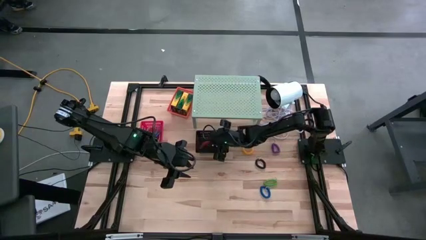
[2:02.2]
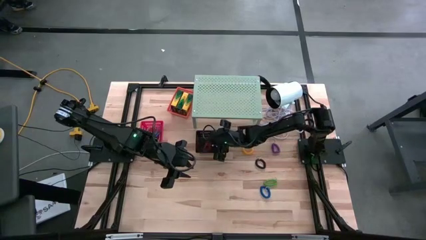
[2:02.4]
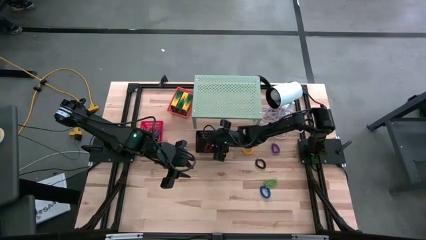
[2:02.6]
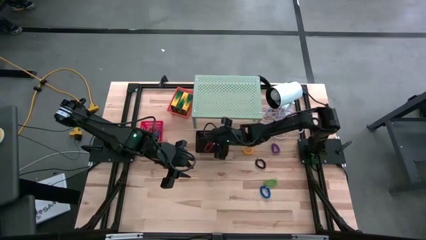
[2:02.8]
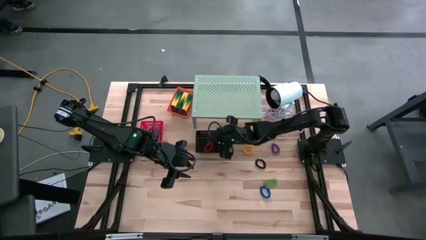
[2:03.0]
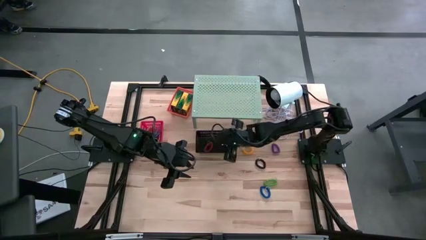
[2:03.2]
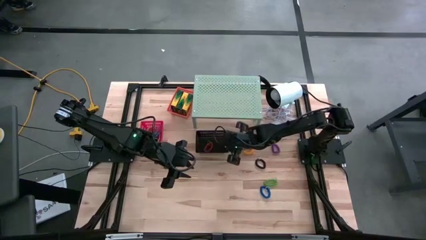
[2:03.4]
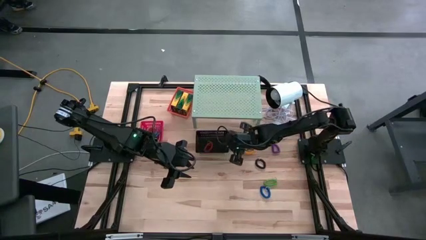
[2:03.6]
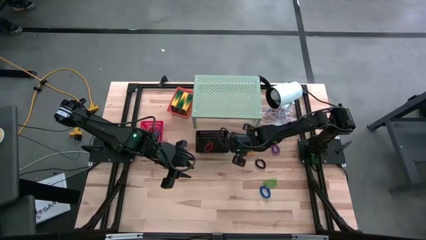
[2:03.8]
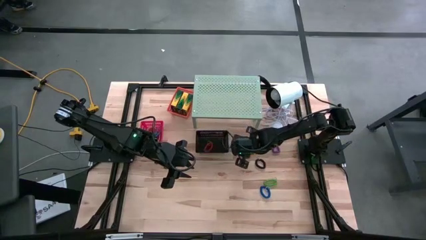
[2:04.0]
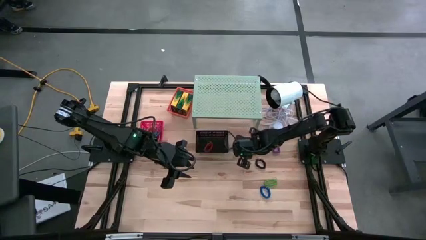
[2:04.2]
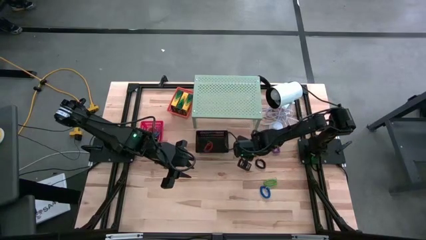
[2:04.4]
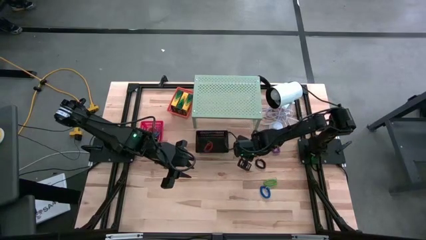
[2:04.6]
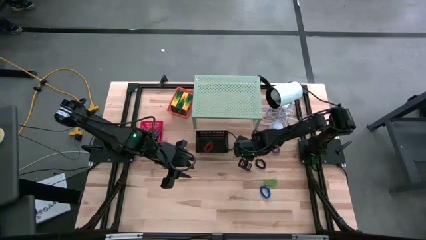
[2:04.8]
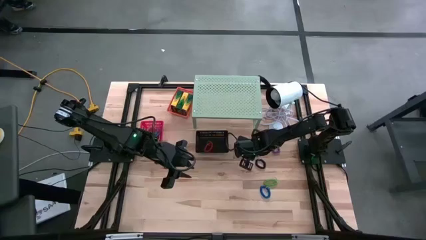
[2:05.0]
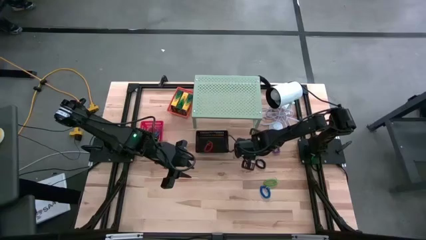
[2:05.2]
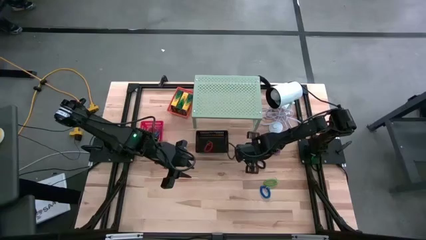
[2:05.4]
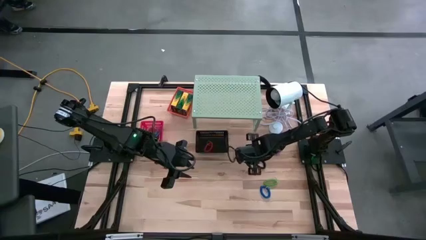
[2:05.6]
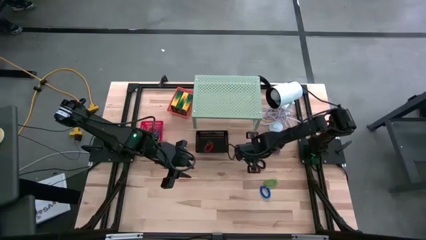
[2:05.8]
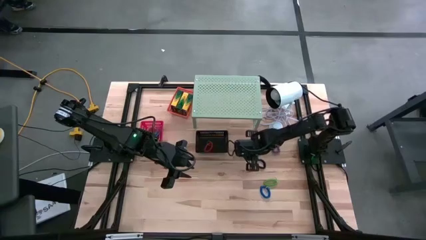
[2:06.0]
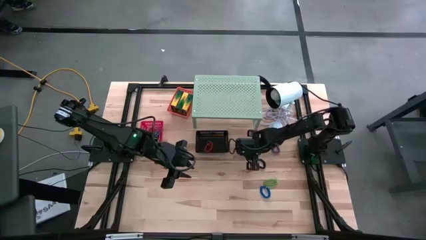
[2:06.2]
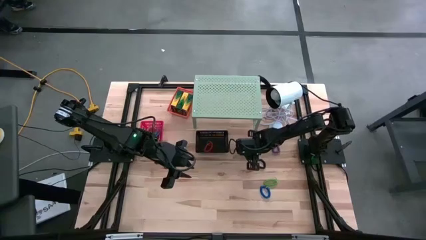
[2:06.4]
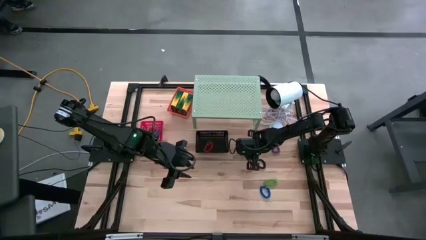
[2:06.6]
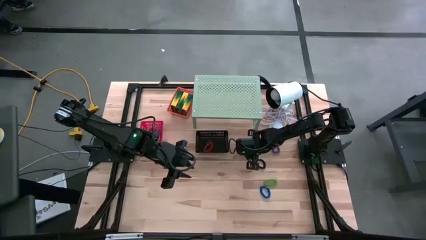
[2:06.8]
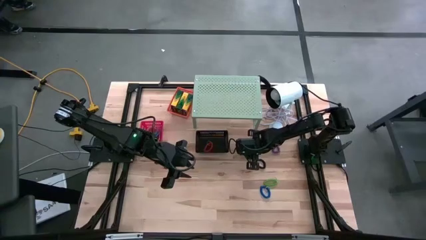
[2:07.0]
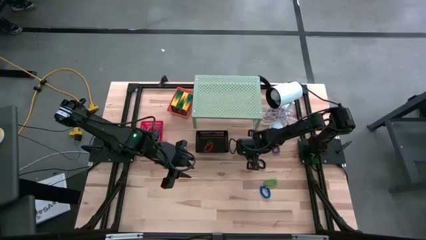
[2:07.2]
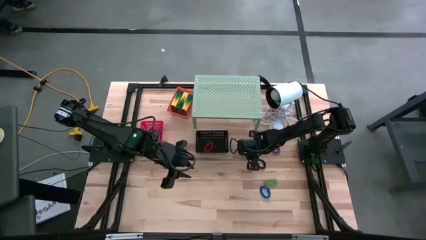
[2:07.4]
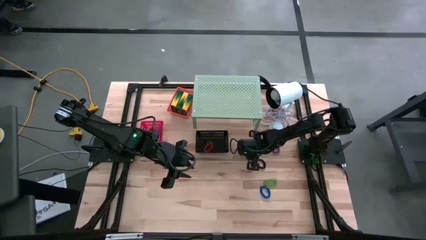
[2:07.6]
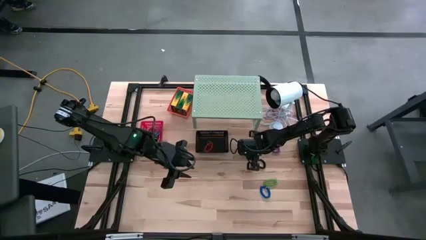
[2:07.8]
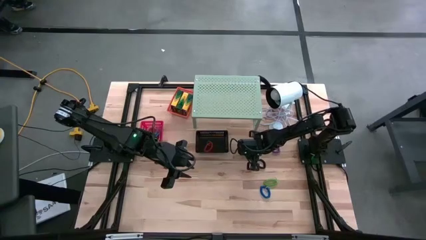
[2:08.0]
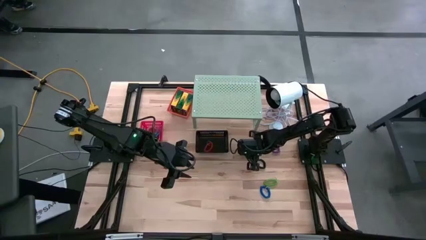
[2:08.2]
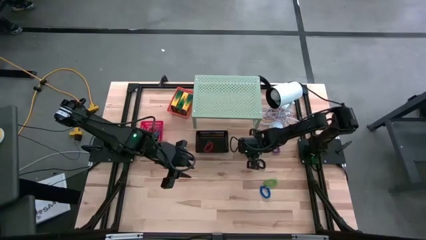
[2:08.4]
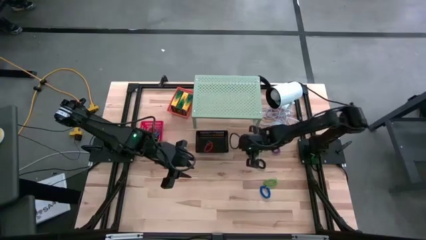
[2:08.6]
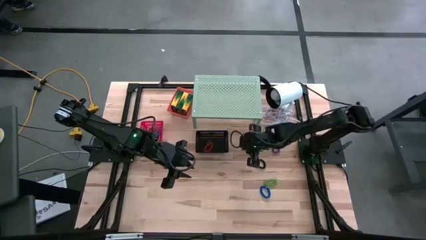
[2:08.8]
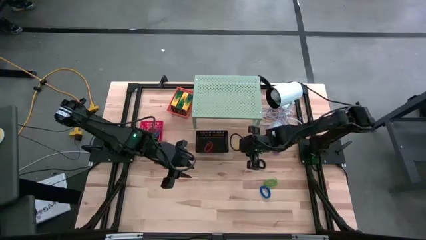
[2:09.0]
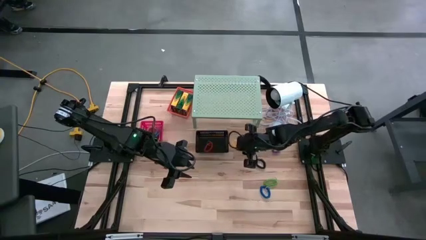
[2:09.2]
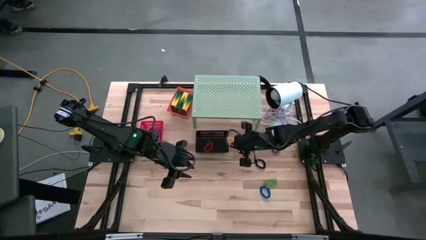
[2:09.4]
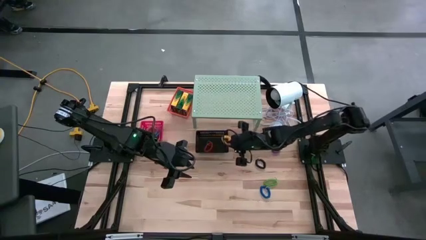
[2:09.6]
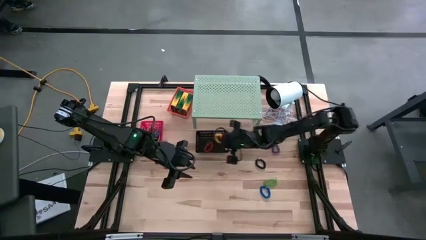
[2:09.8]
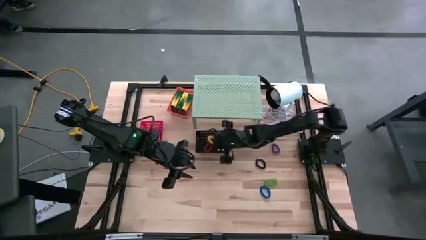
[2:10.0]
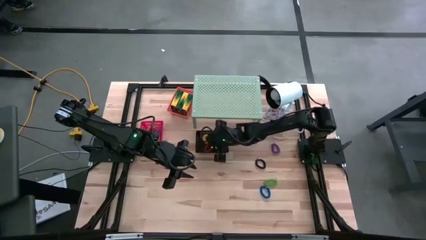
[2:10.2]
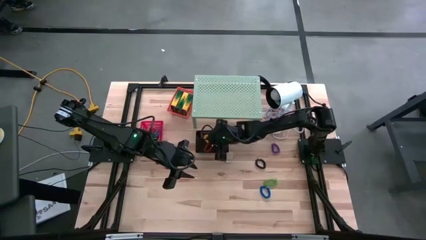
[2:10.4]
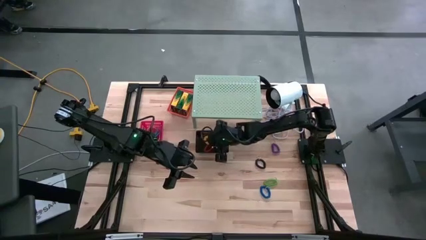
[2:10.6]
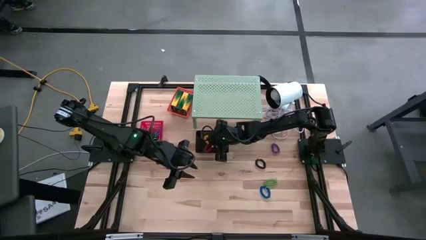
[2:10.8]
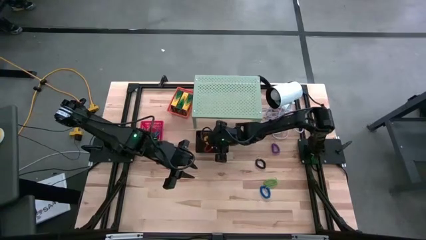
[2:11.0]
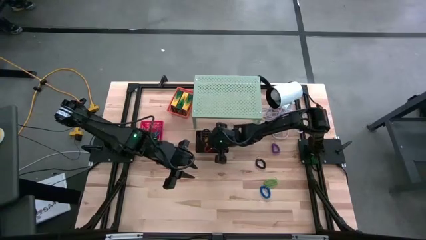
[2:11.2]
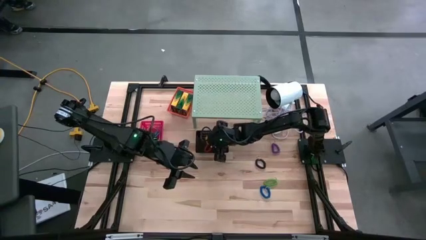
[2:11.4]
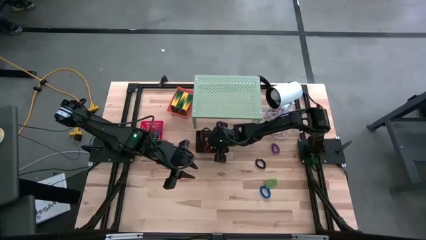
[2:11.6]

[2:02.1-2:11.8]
Task: Pick & Place Office Desk Supplies
Put the yellow spring rubber band into the black bin on the shelf

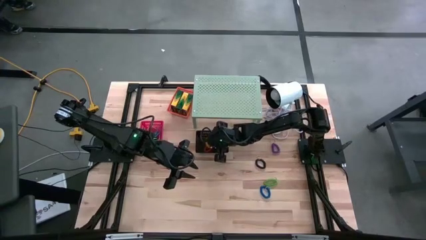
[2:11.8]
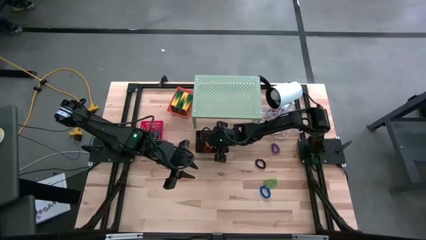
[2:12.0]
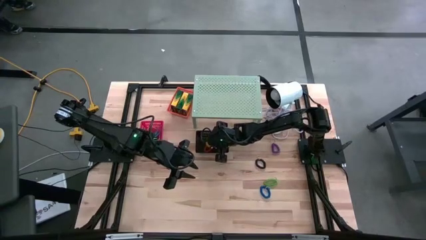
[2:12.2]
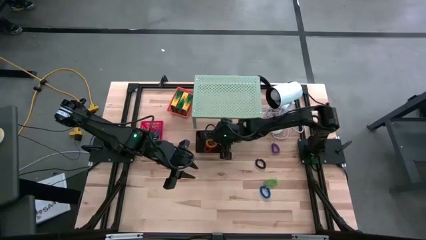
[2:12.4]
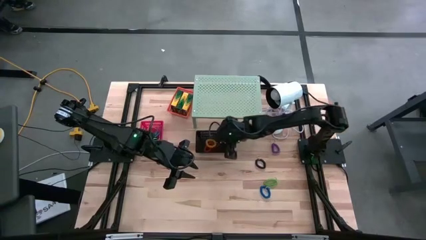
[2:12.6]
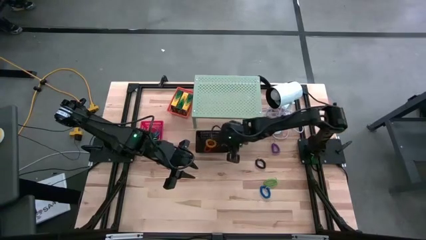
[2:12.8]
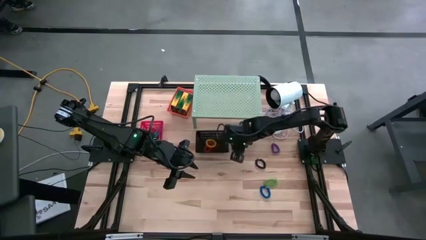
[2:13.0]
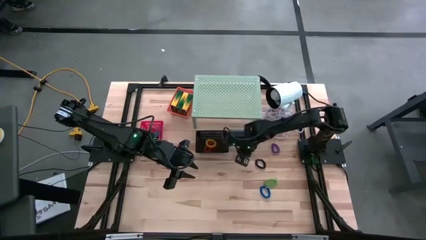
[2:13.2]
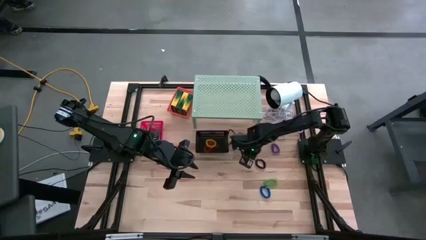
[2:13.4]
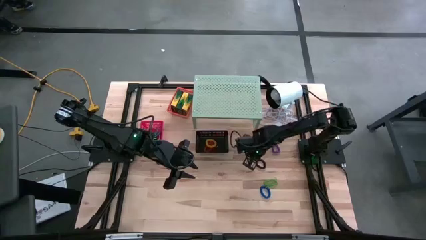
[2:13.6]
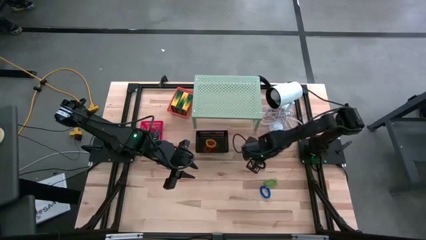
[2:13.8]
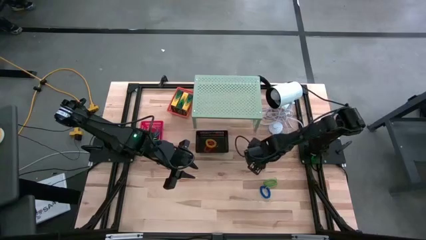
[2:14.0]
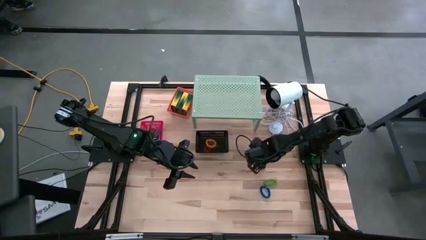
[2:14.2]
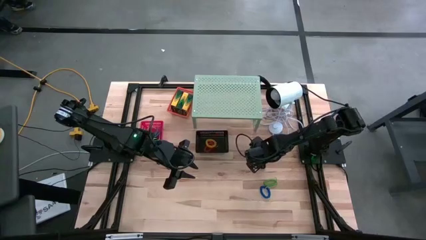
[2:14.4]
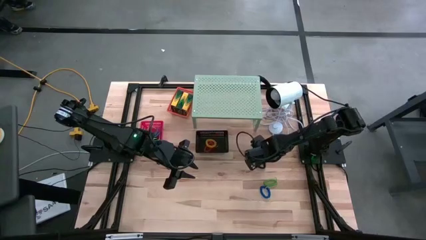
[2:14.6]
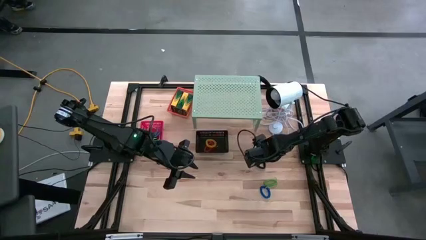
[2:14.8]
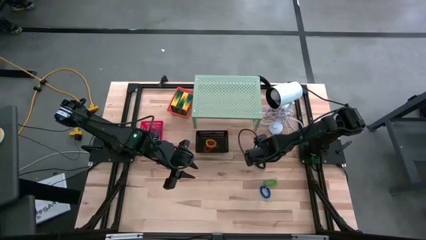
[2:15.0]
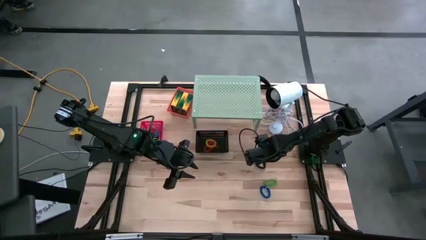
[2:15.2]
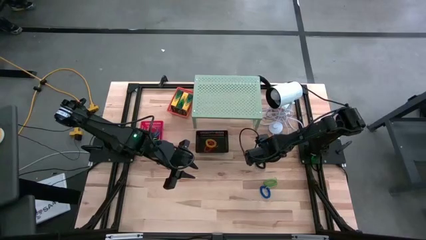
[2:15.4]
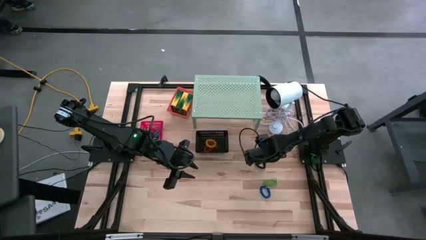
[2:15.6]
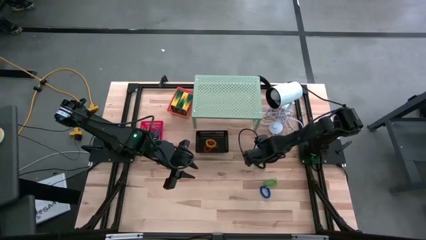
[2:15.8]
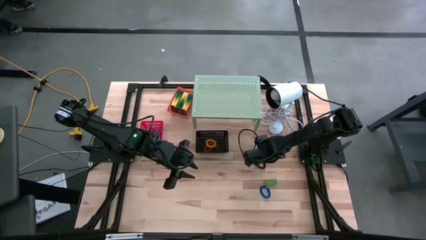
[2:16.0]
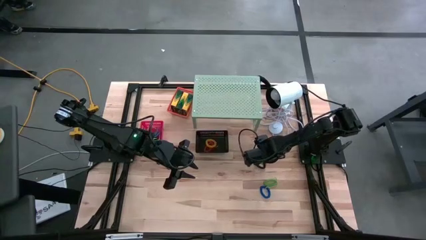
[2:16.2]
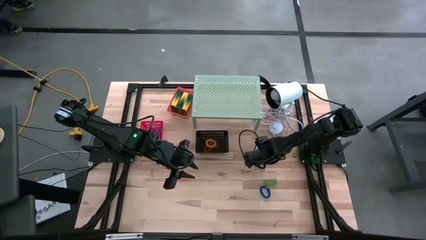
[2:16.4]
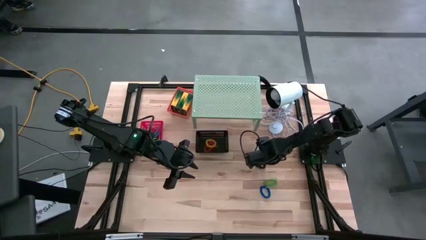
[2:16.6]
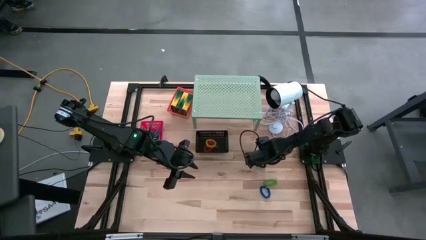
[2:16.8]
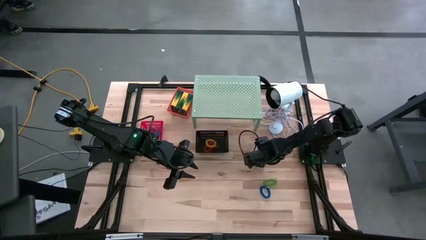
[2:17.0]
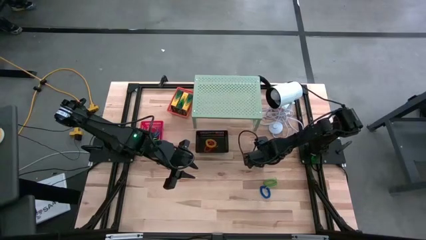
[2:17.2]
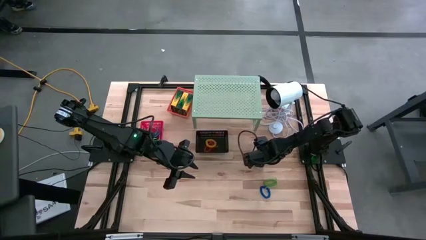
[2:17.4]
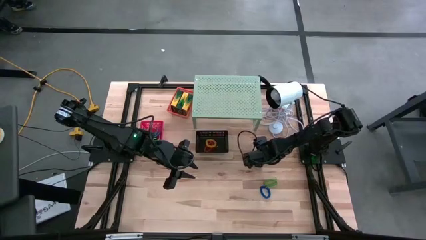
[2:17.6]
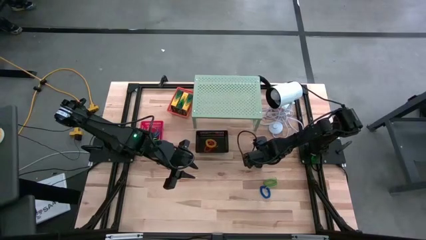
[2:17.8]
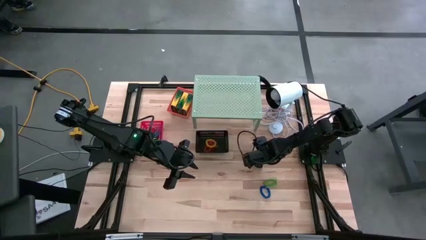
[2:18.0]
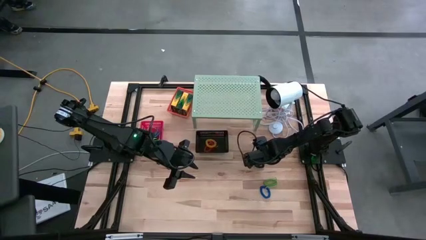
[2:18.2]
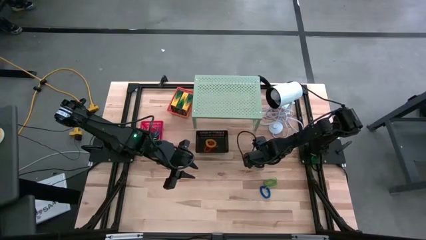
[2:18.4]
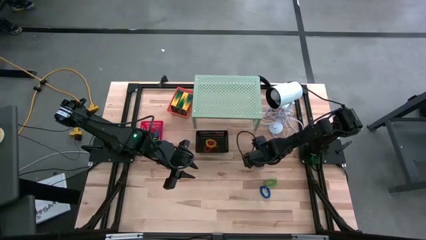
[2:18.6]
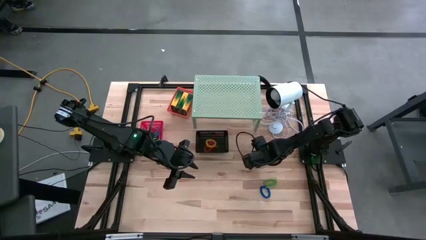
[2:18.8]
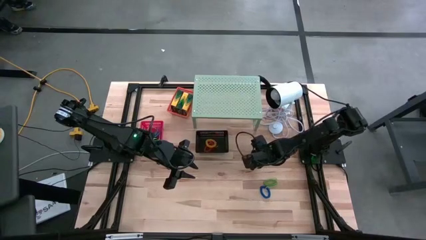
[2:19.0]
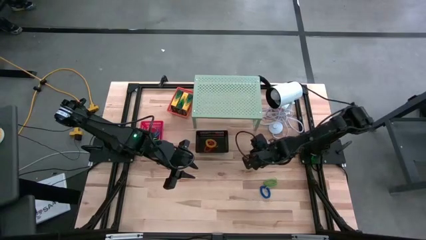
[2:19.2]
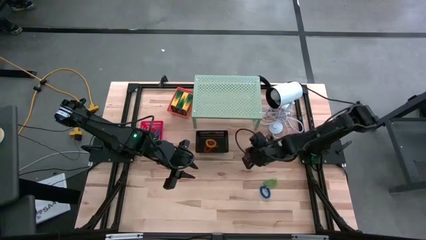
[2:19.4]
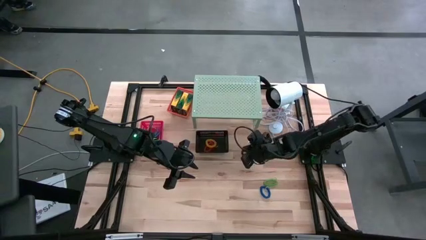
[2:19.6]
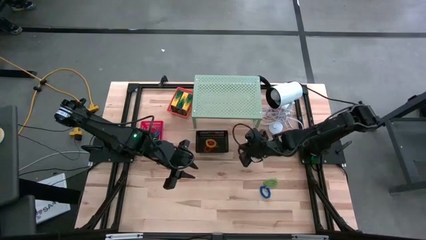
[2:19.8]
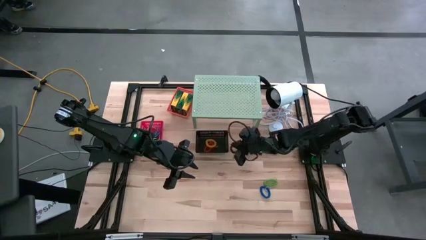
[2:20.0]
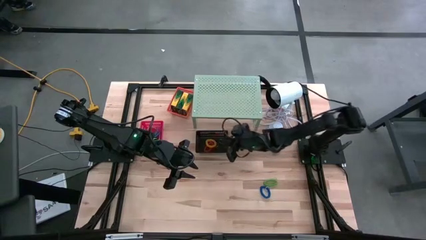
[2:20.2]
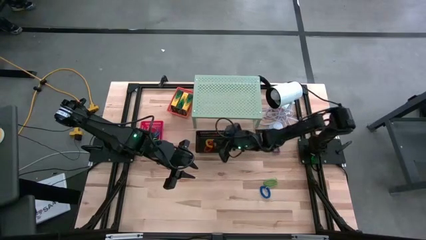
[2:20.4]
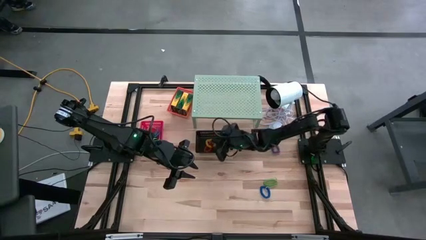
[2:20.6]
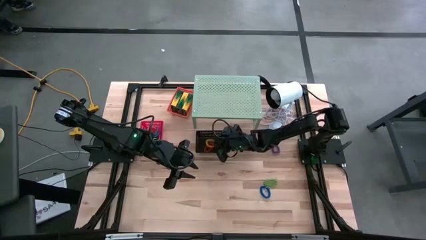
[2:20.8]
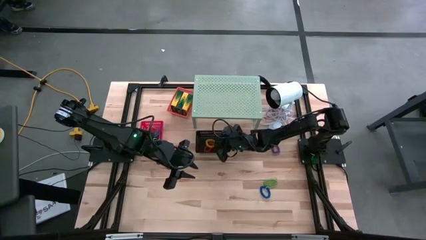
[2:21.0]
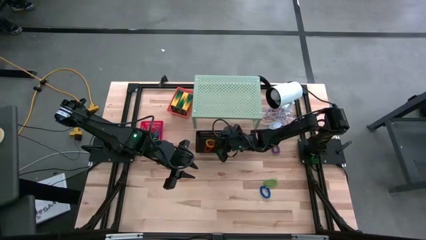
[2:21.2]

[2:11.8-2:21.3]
Put the black spring rubber band into the black bin on the shelf
